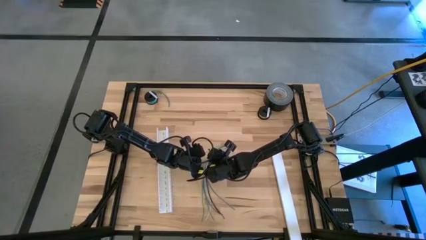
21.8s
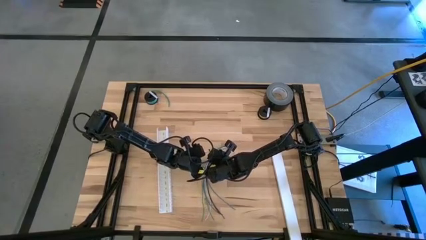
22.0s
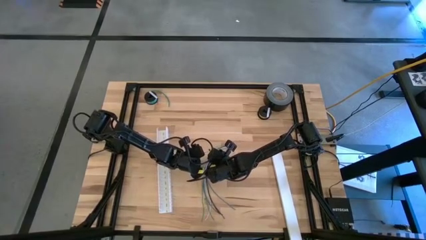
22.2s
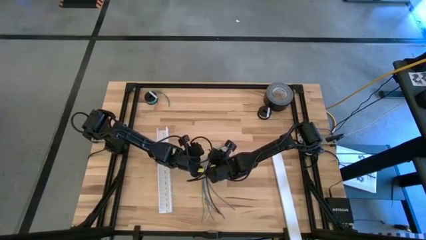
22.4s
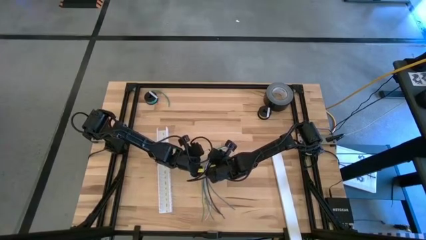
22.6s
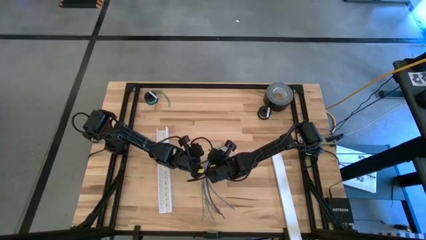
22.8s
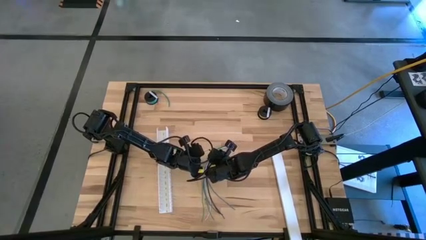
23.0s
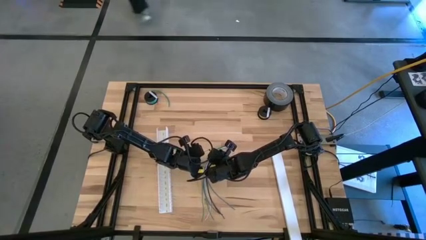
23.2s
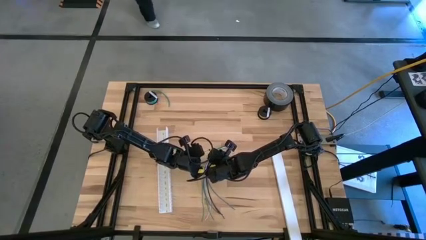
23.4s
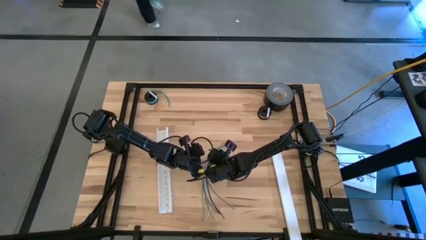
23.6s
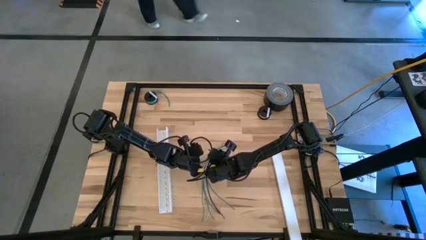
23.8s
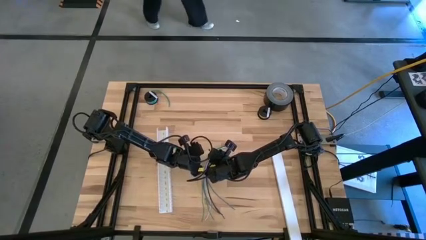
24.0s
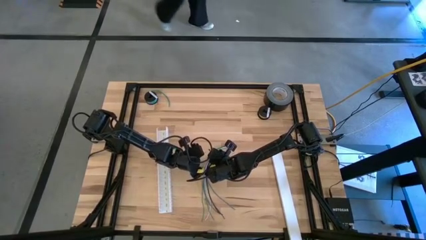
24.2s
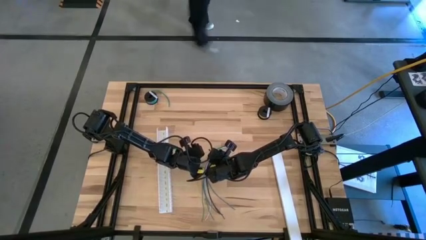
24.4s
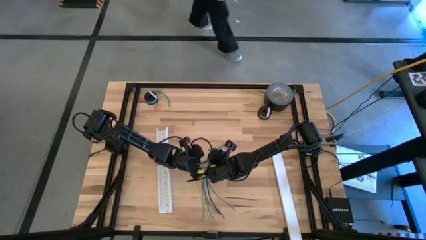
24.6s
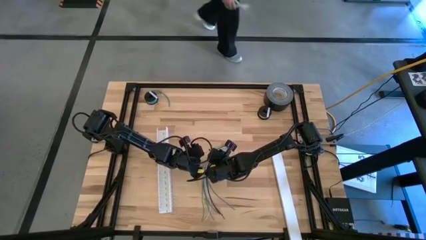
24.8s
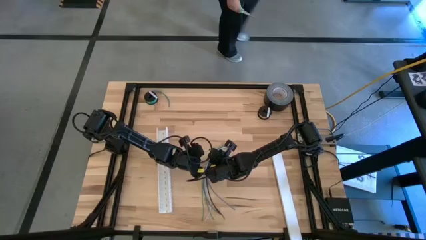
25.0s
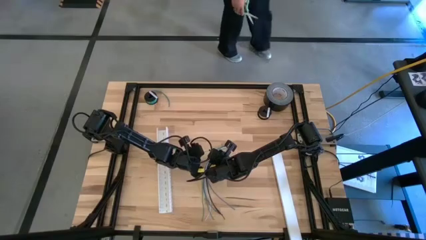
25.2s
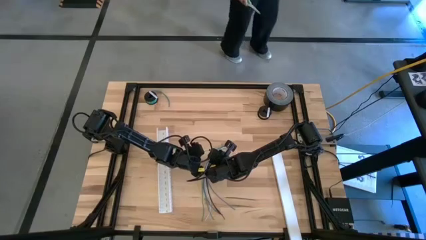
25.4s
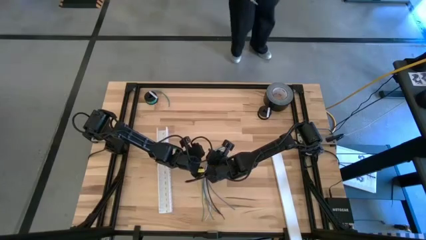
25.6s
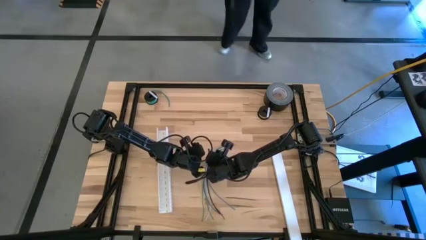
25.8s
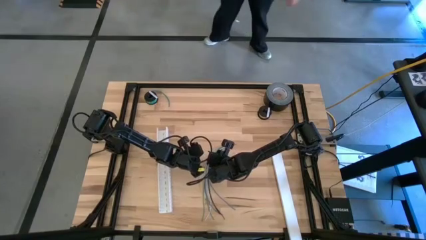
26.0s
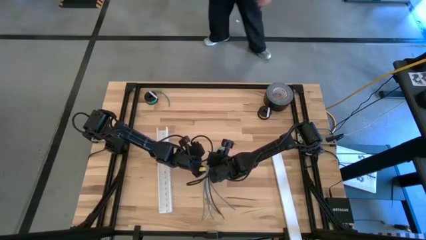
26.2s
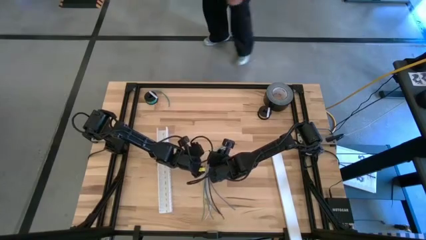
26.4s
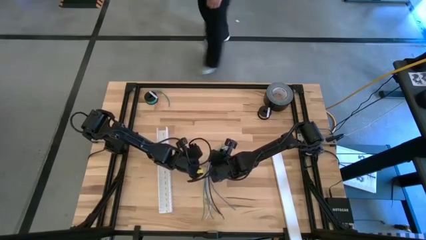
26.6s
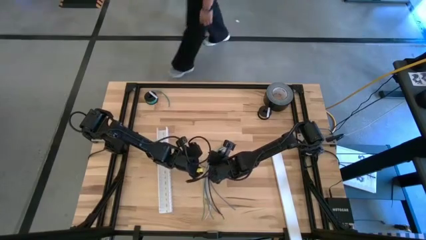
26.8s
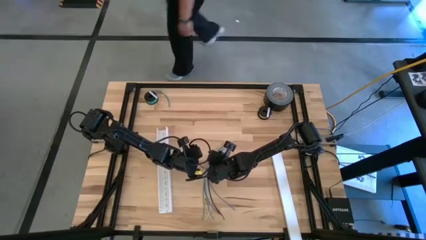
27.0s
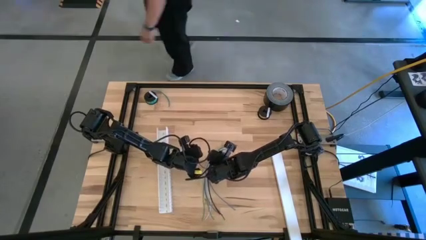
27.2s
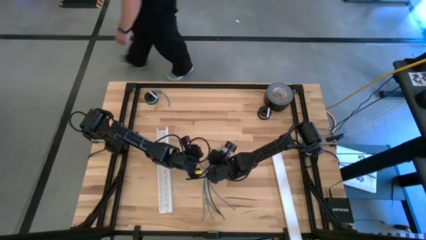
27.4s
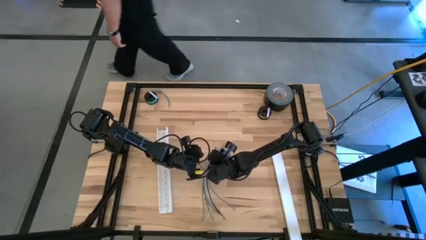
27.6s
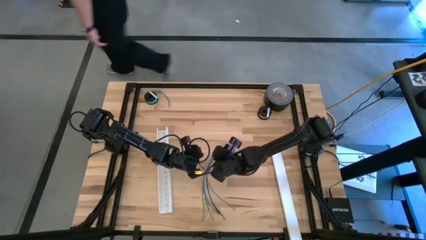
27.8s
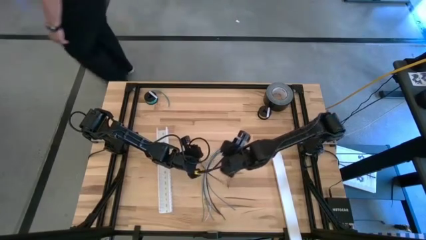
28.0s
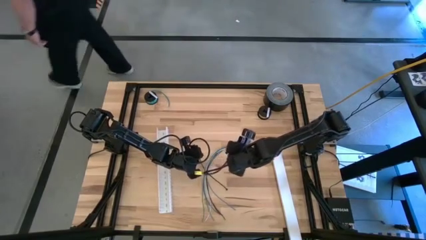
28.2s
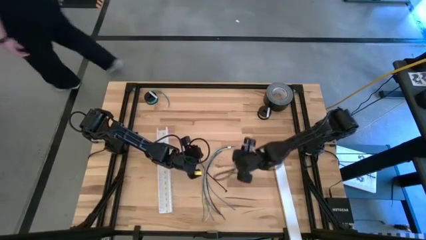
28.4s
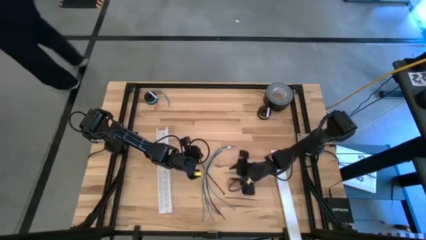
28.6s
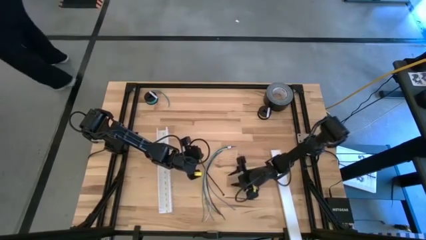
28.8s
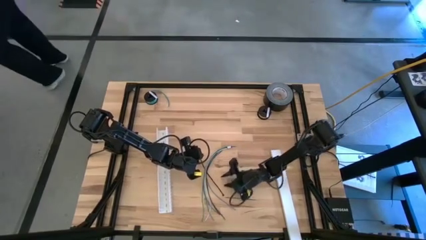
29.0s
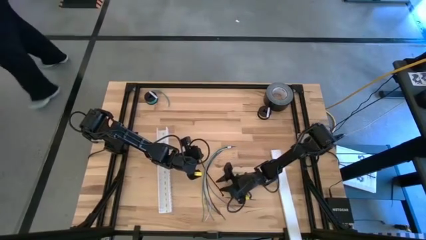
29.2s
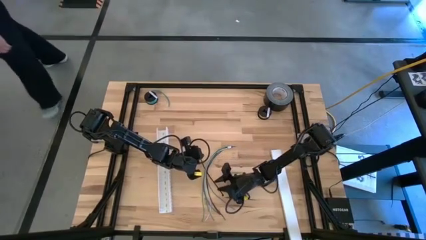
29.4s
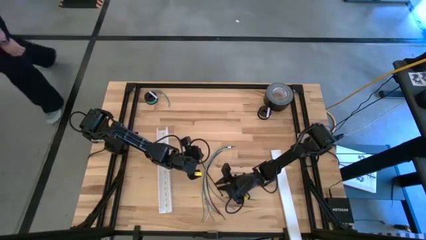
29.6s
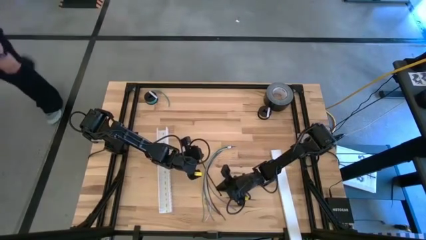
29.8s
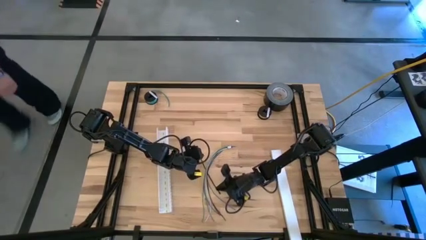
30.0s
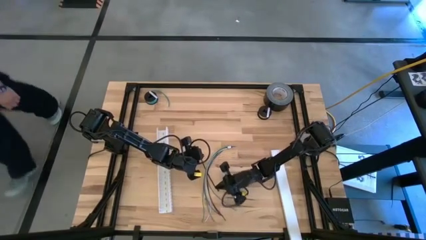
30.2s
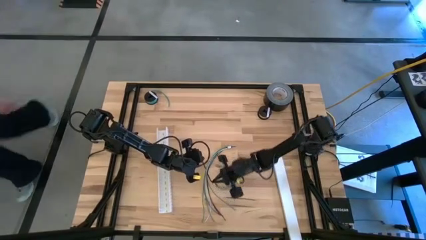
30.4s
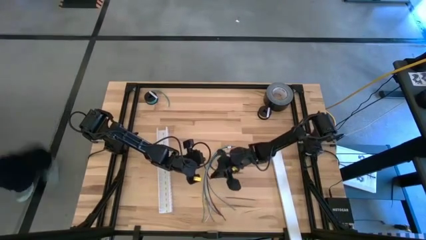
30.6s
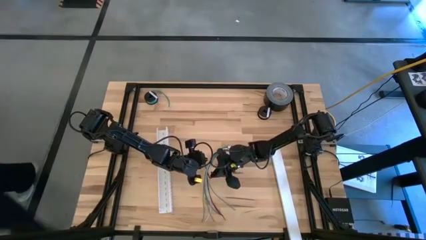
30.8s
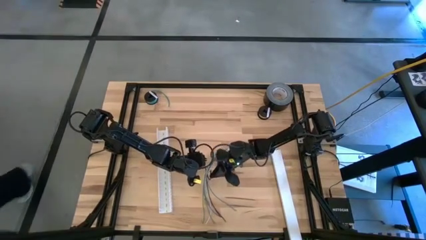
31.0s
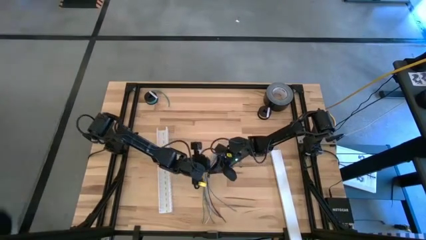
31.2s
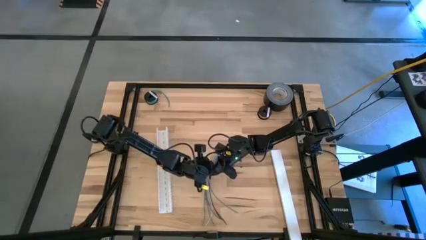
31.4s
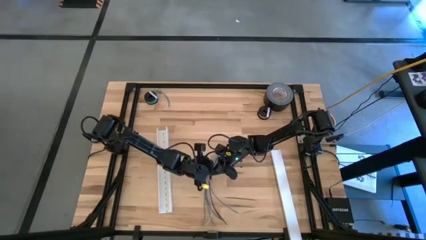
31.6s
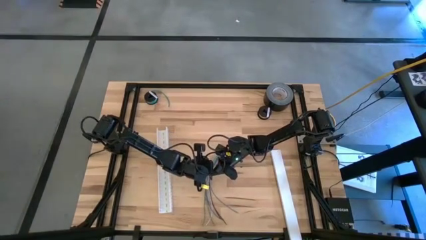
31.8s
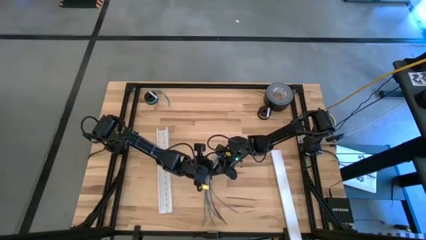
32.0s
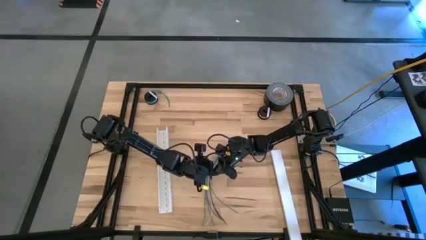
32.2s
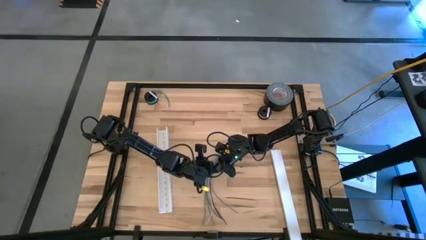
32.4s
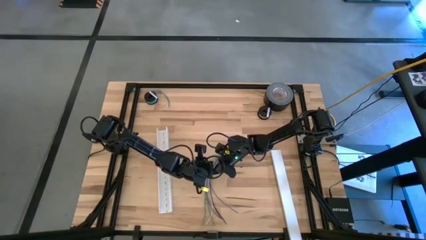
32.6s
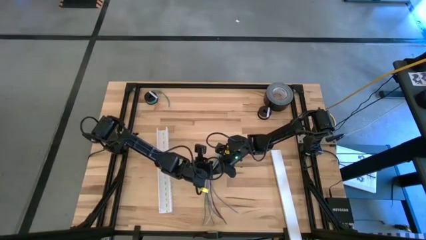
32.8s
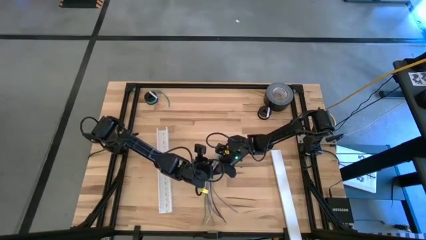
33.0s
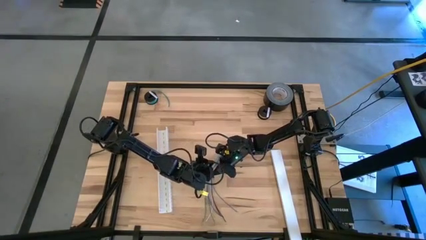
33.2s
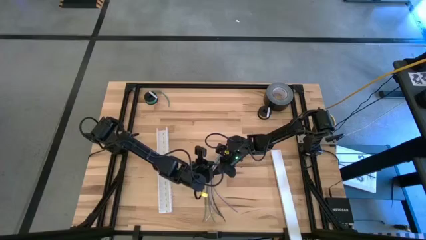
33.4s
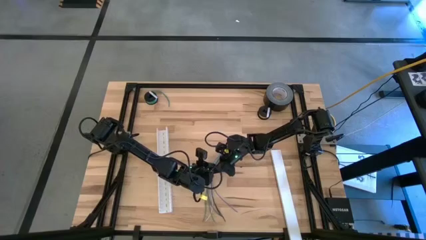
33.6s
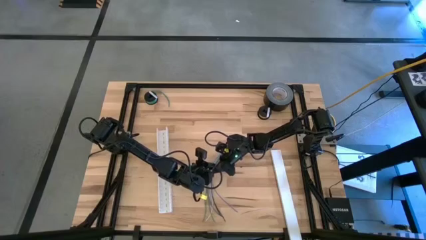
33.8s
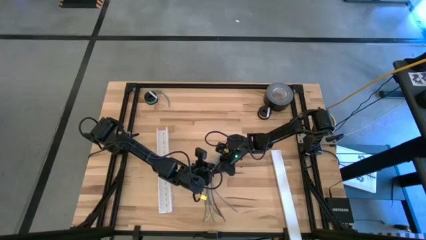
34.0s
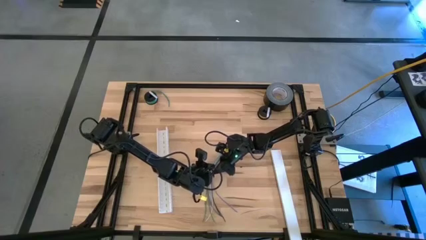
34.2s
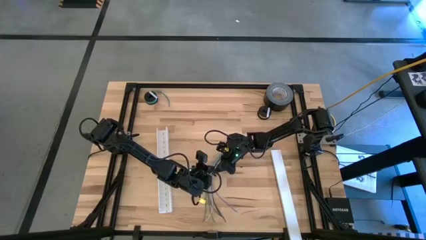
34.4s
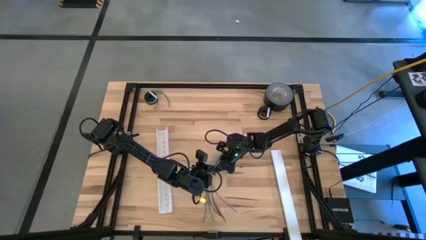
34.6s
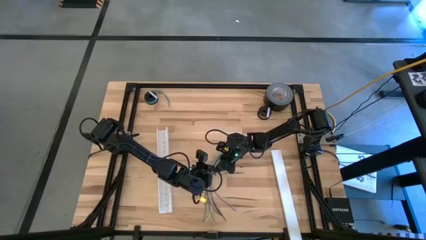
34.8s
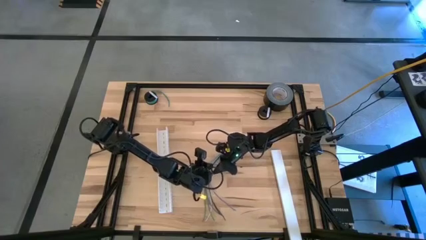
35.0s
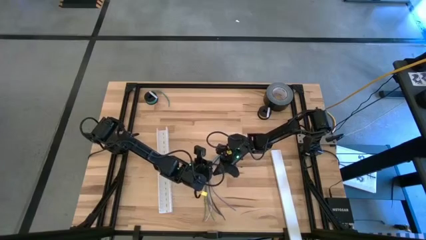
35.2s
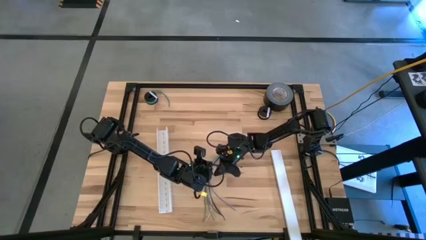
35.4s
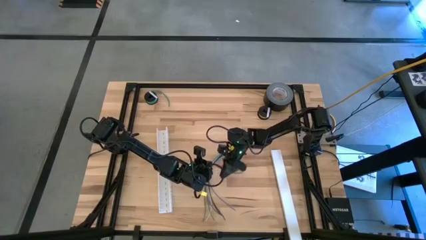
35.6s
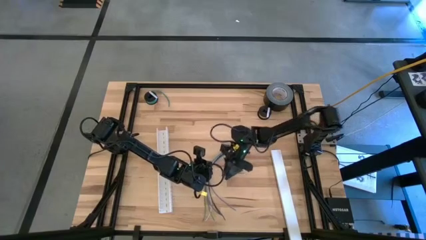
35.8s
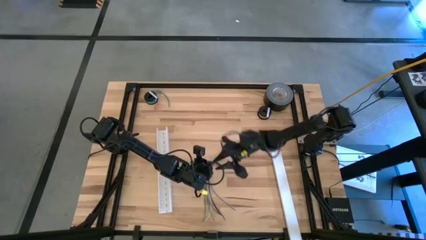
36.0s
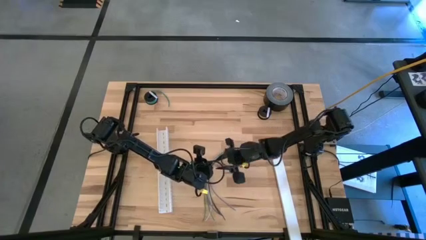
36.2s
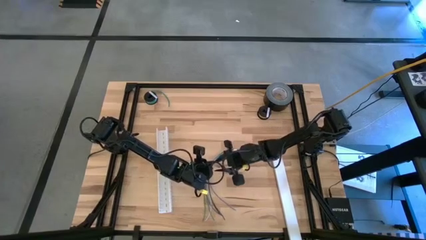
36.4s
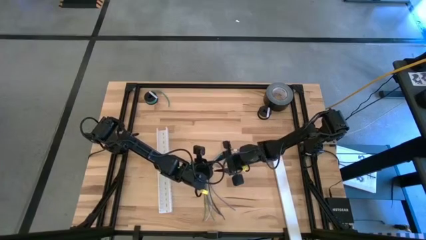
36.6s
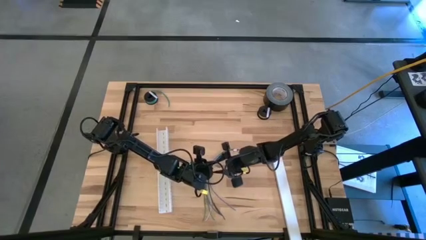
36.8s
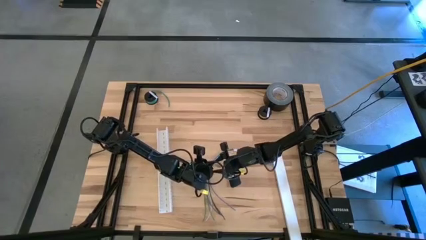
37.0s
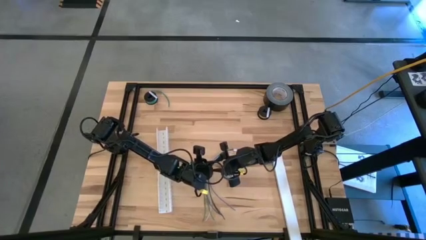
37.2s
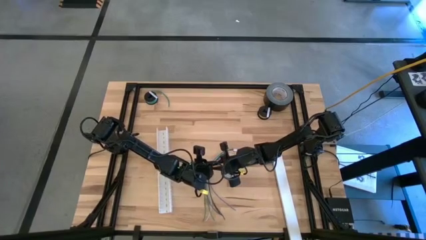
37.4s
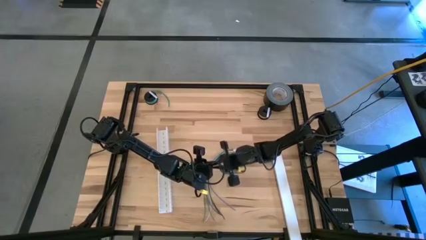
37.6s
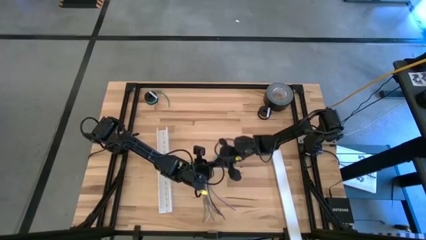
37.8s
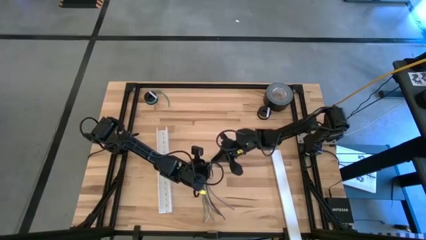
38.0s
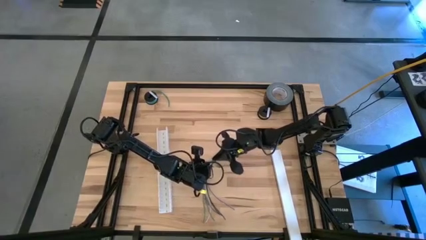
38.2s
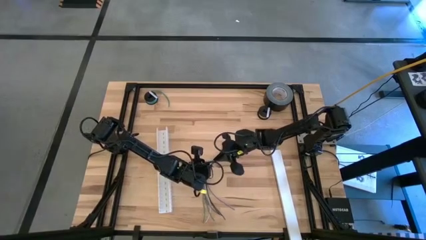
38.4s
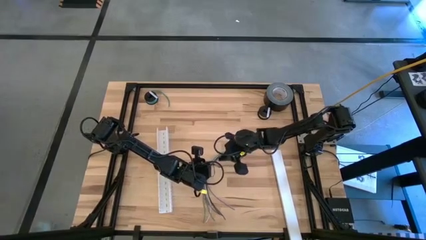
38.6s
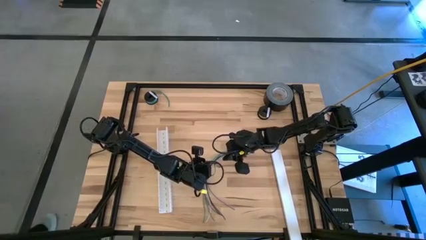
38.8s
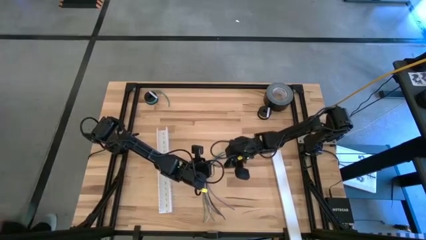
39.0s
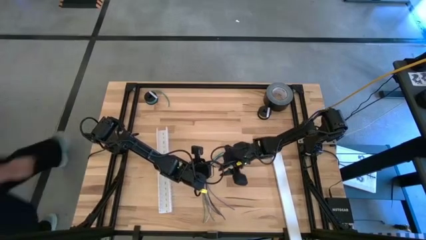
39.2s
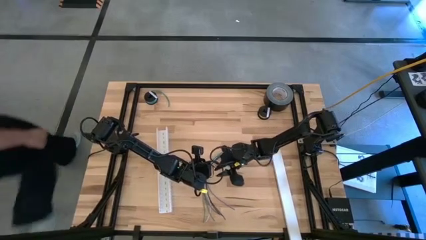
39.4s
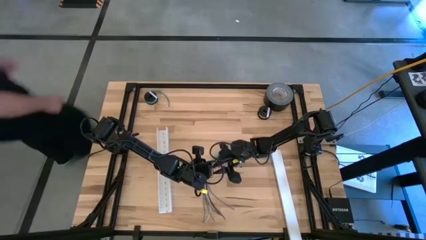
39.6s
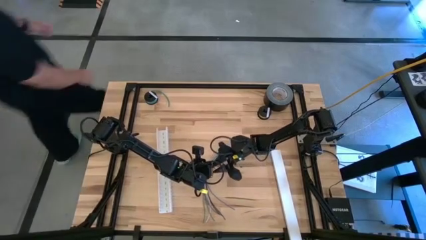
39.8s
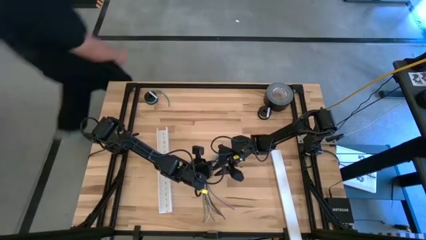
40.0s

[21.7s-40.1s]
Task: Ziptie cables
Wrap the colored cables with the black zip tie
